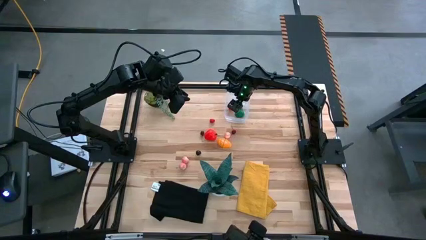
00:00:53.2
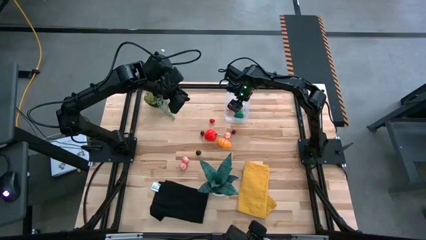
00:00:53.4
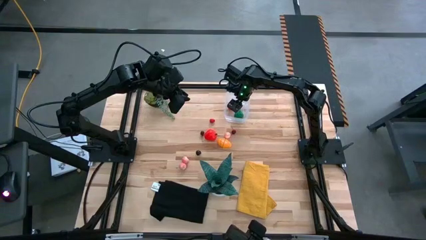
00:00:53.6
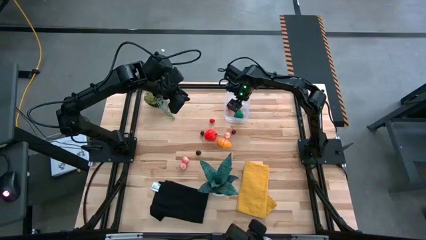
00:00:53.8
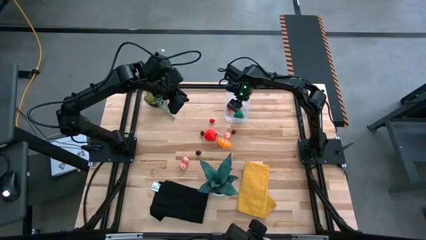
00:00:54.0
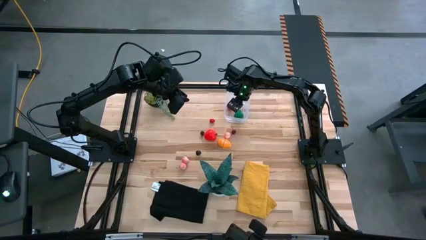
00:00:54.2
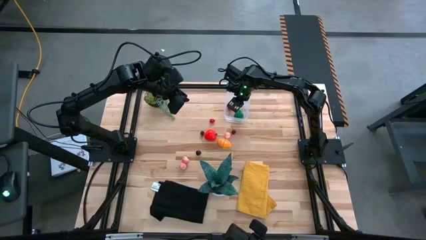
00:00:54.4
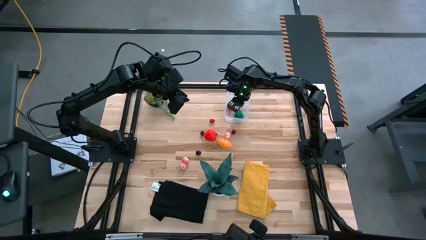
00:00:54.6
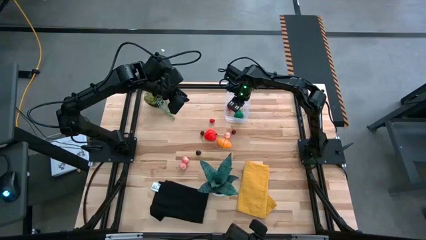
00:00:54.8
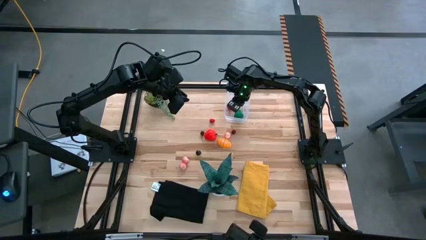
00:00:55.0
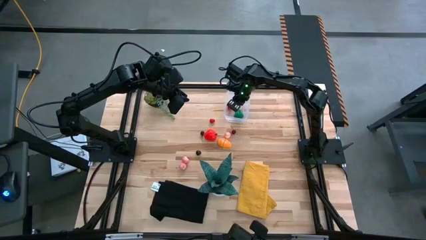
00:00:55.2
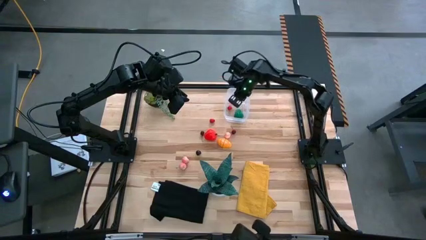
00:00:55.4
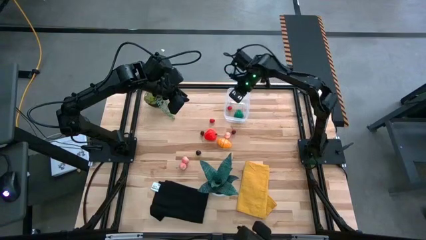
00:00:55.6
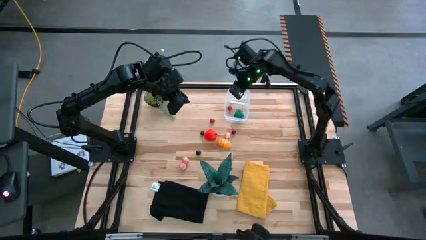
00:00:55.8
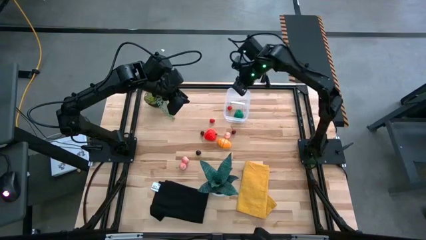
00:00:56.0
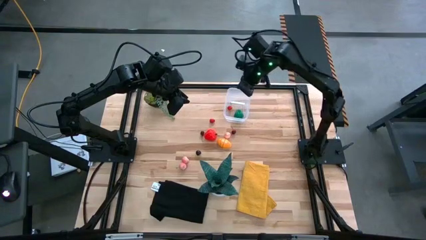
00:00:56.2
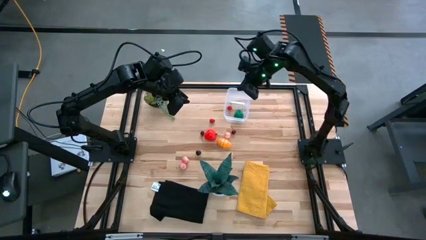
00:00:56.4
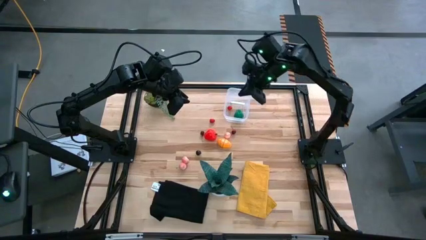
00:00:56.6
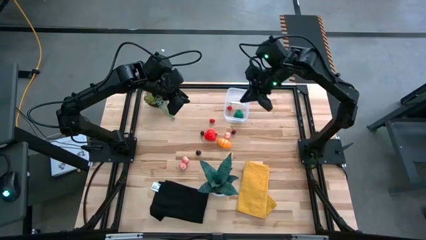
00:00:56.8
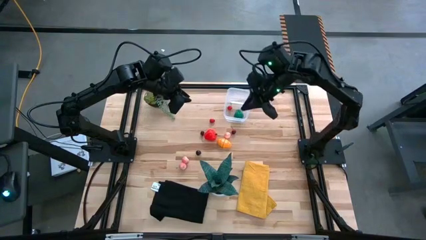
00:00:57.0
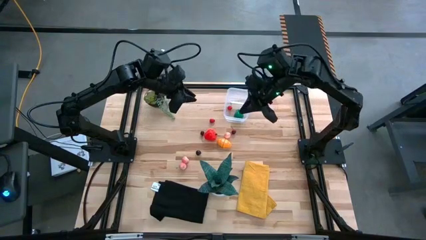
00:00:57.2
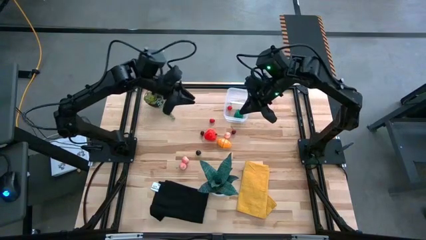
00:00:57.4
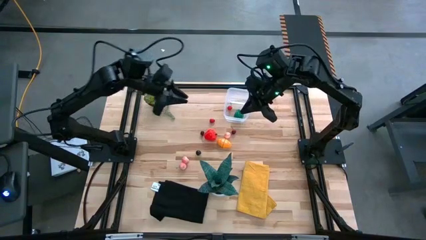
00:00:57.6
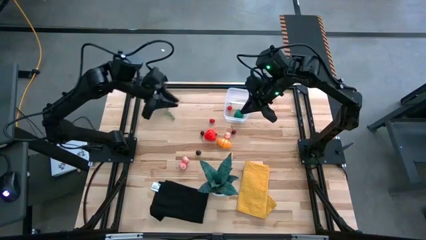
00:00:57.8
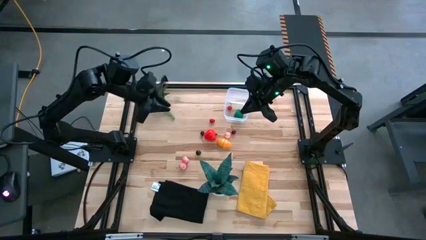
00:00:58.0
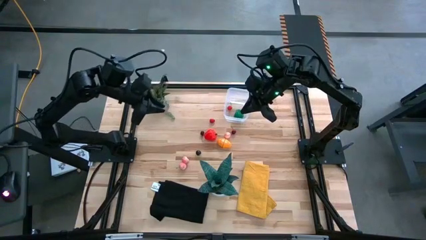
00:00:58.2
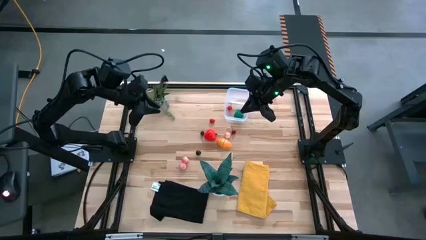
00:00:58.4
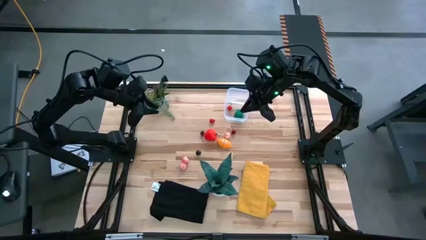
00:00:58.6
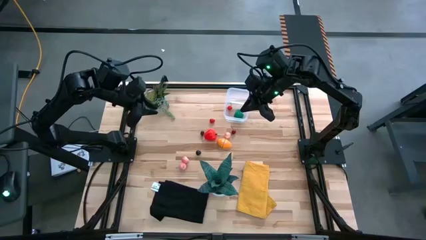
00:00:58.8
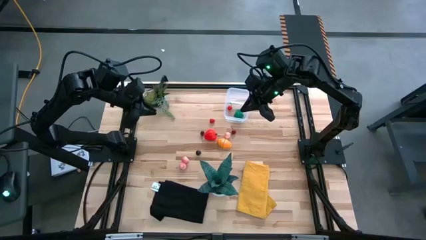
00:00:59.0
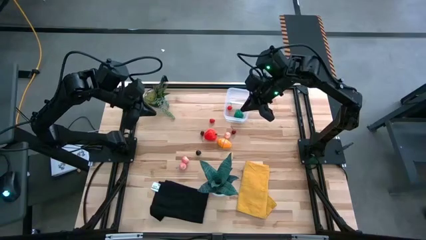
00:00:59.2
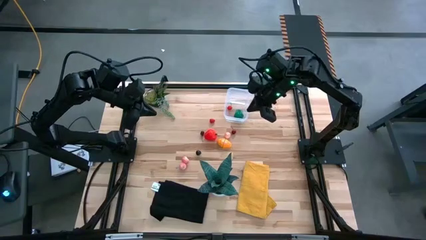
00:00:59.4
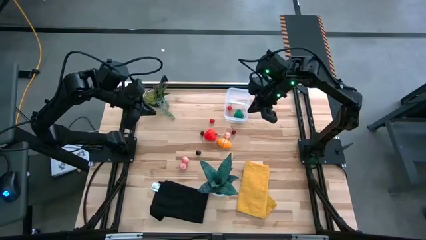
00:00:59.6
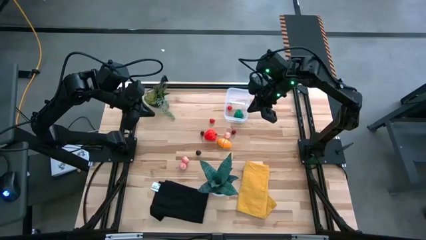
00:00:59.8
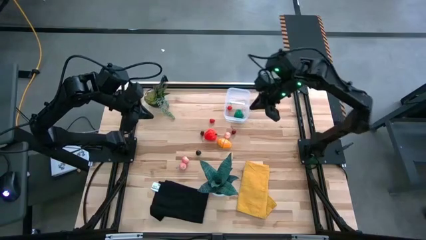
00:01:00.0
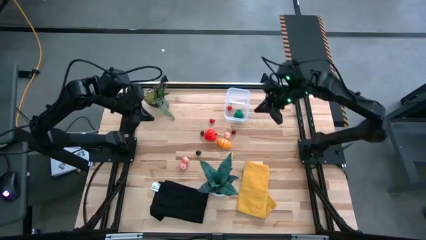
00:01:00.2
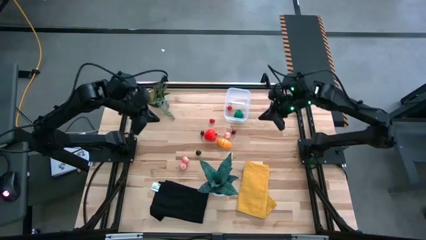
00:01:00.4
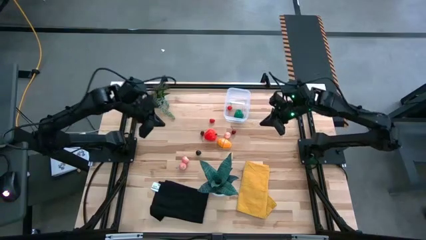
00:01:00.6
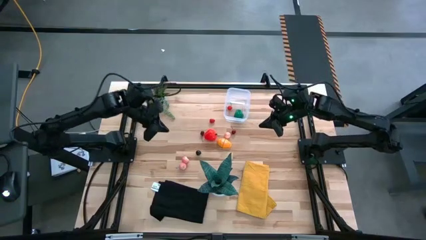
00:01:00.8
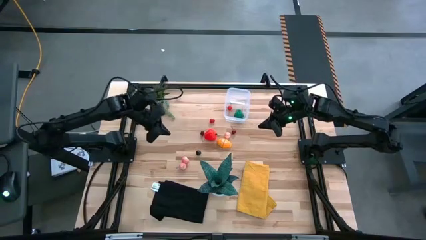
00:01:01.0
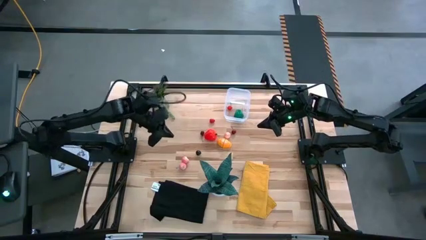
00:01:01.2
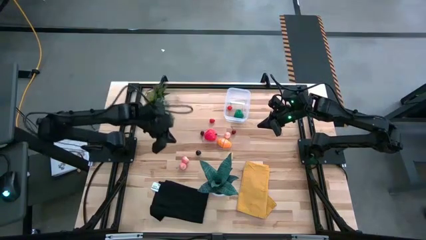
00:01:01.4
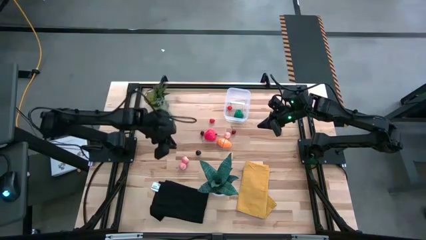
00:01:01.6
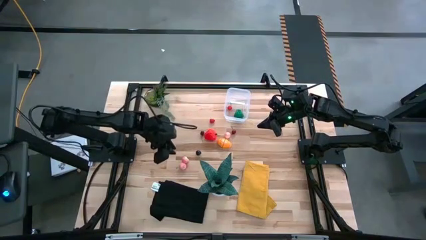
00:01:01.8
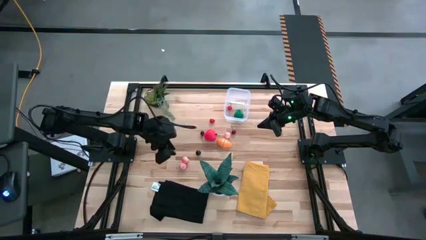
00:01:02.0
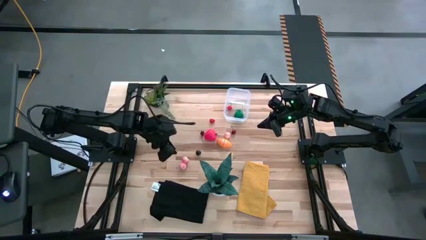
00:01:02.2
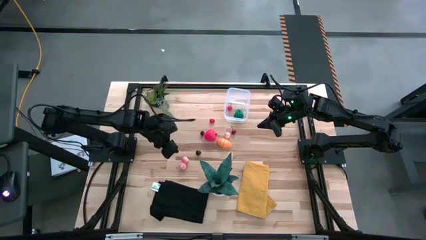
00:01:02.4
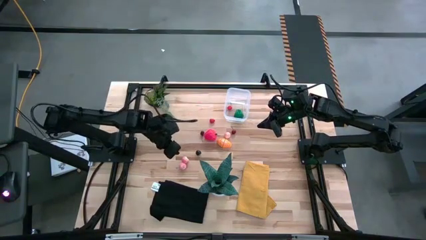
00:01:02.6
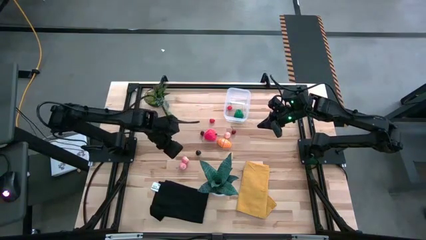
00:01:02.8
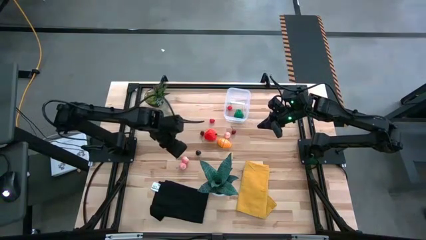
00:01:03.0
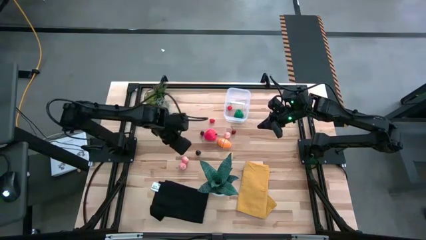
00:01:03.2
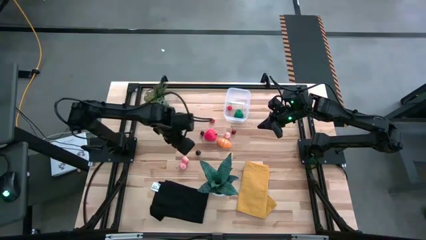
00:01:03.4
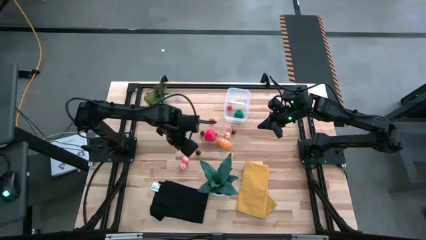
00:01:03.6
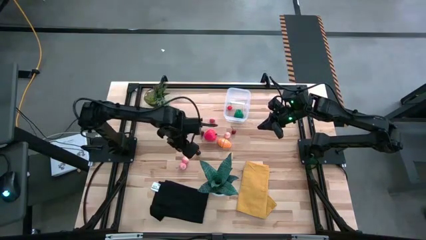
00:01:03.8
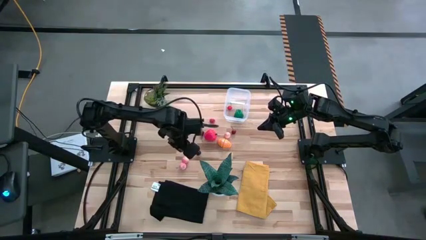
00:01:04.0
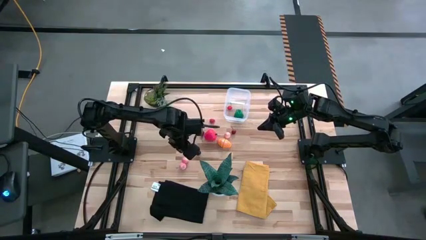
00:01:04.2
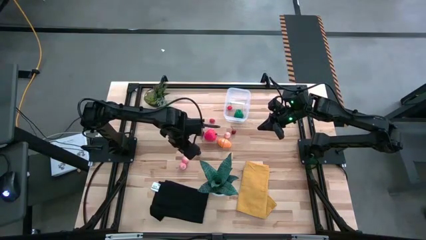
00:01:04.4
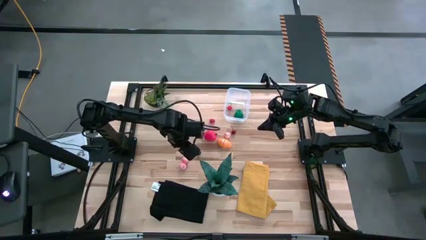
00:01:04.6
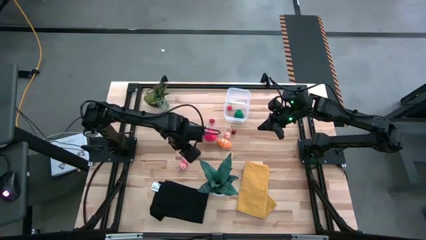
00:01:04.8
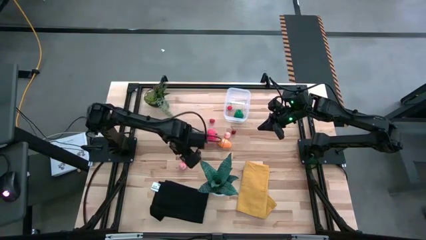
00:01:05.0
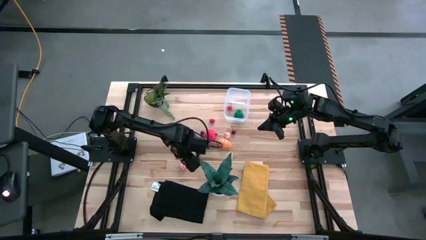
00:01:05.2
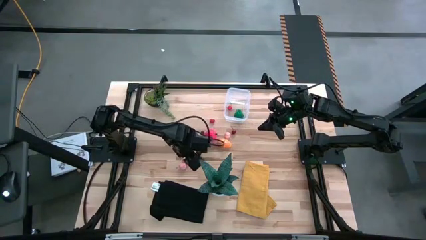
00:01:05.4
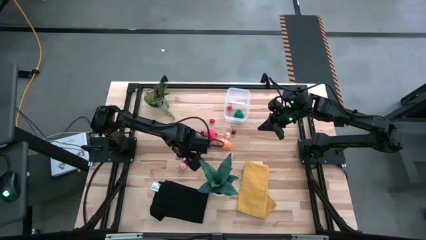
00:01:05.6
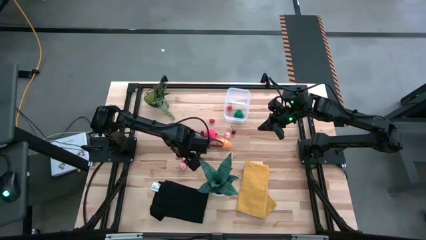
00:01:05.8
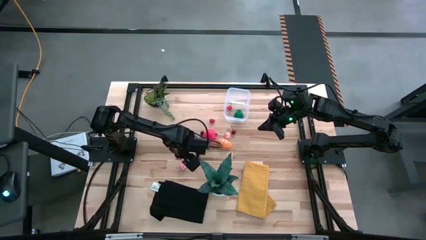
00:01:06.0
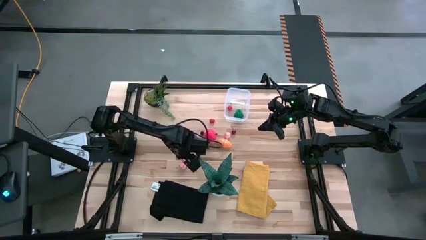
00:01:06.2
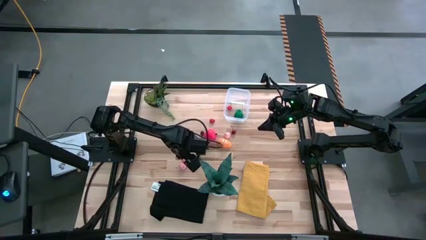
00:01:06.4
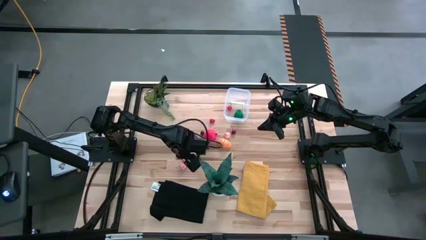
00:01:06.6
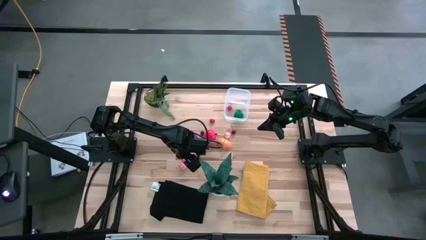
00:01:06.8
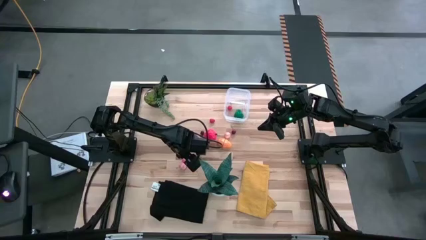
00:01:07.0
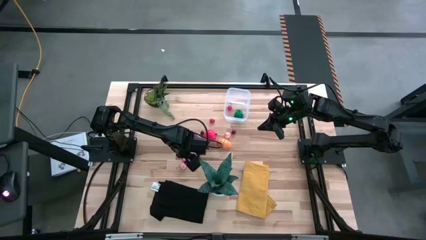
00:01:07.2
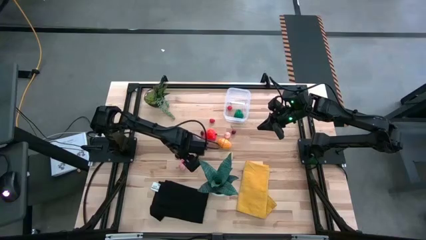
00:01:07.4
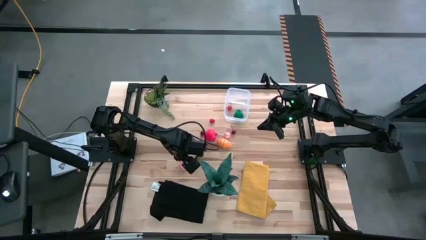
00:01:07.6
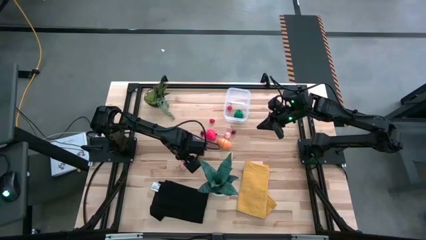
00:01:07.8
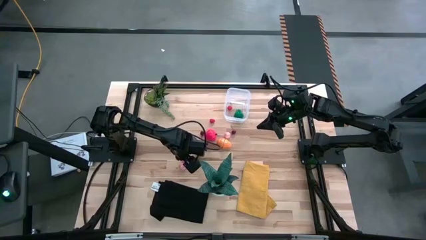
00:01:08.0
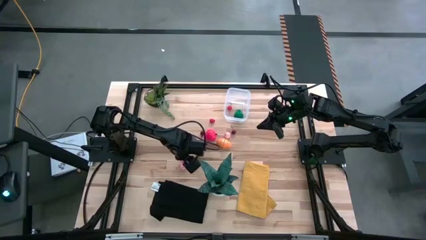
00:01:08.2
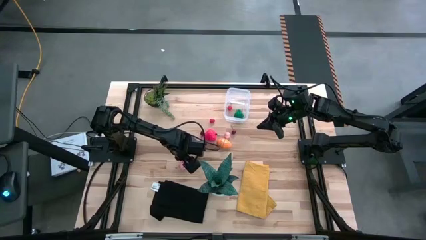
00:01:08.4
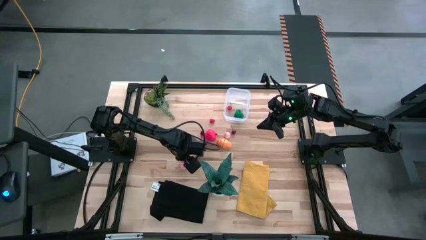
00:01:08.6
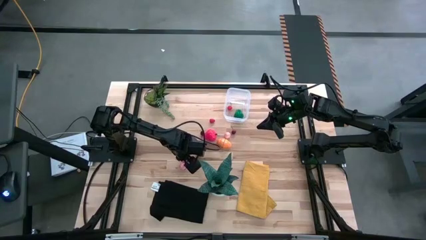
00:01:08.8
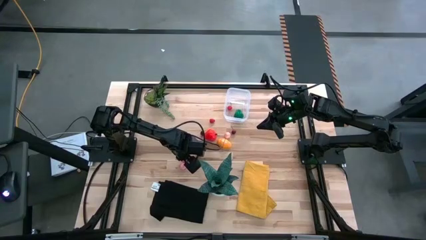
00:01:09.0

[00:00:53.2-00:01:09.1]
Task: Pick and placing Produce into tupperware
Put the top left apricot into the transparent container
